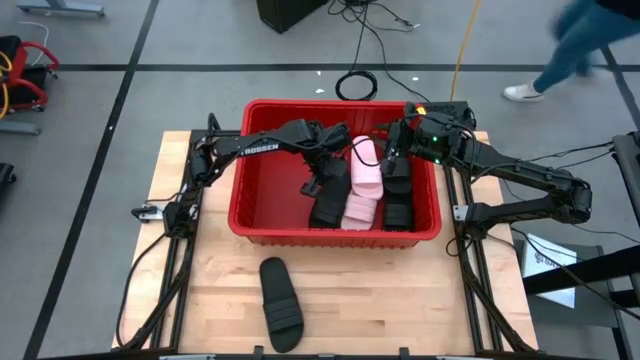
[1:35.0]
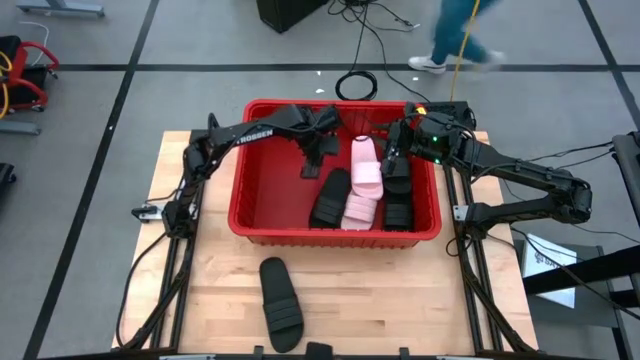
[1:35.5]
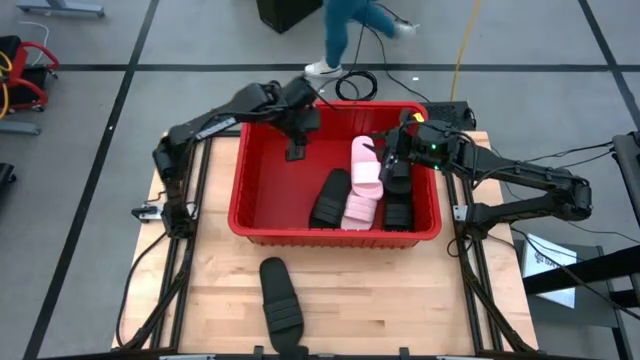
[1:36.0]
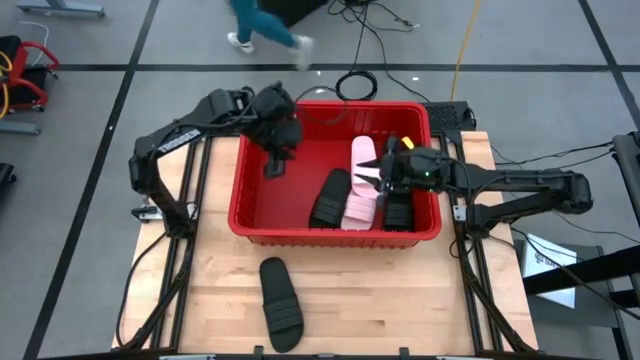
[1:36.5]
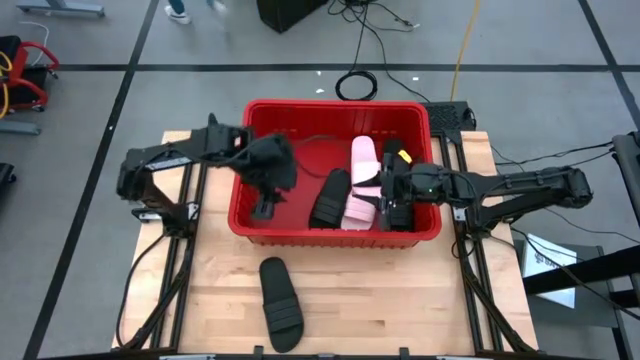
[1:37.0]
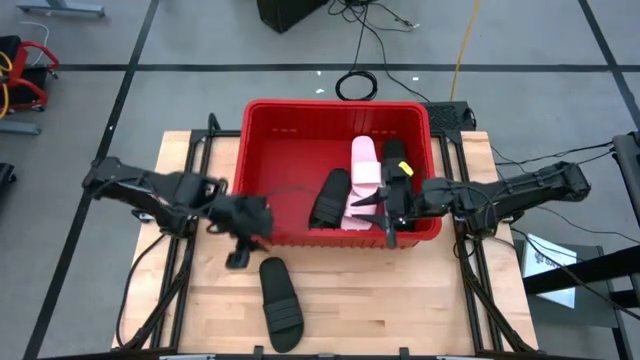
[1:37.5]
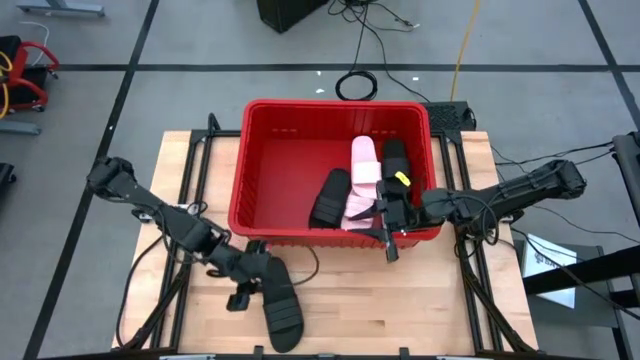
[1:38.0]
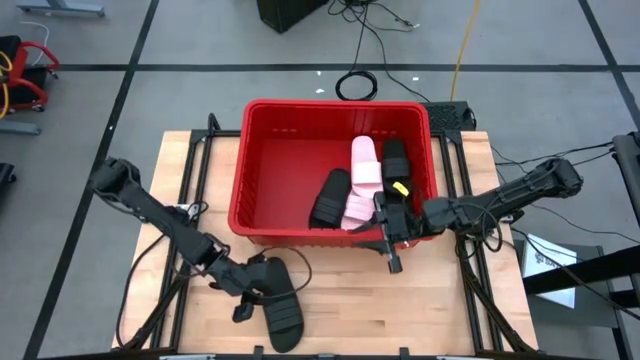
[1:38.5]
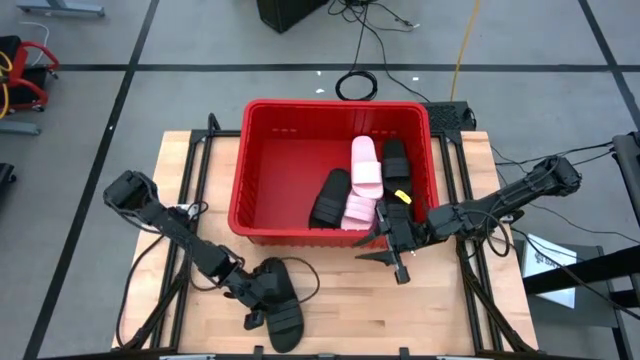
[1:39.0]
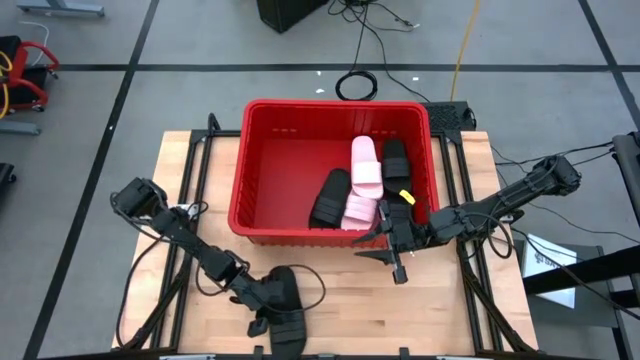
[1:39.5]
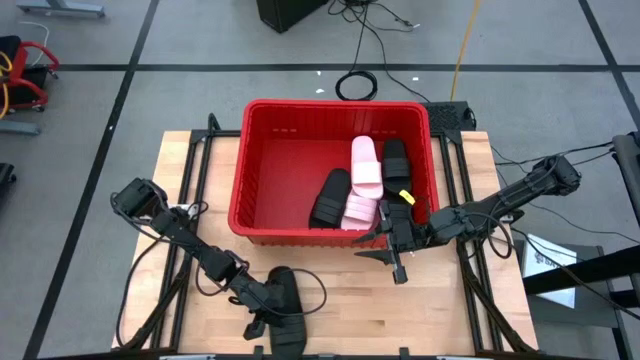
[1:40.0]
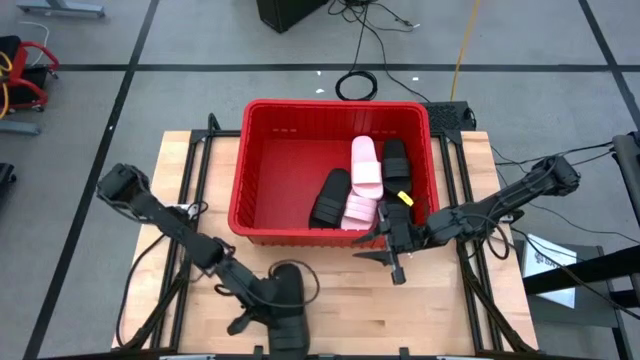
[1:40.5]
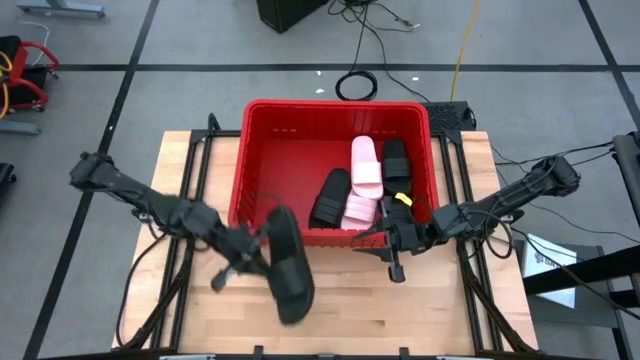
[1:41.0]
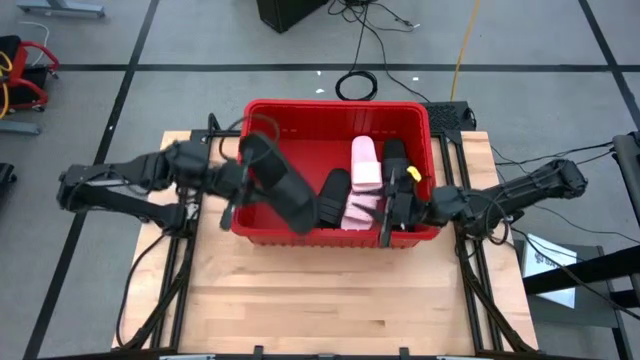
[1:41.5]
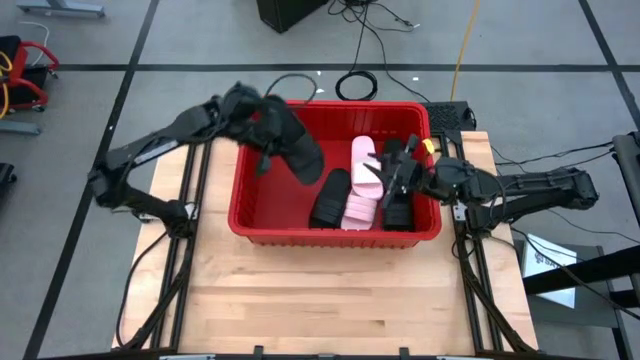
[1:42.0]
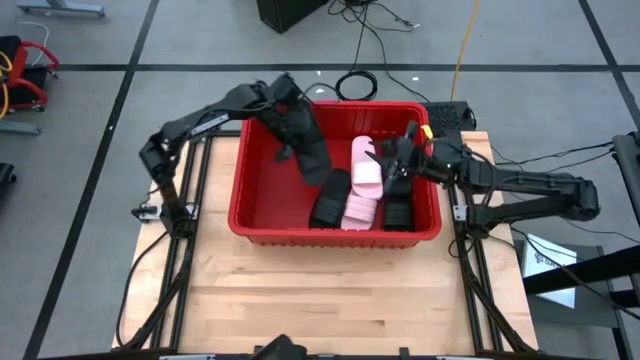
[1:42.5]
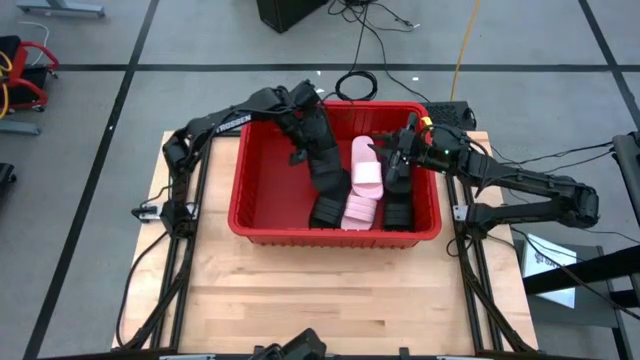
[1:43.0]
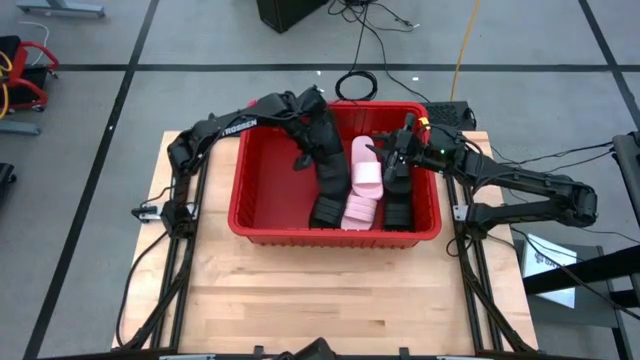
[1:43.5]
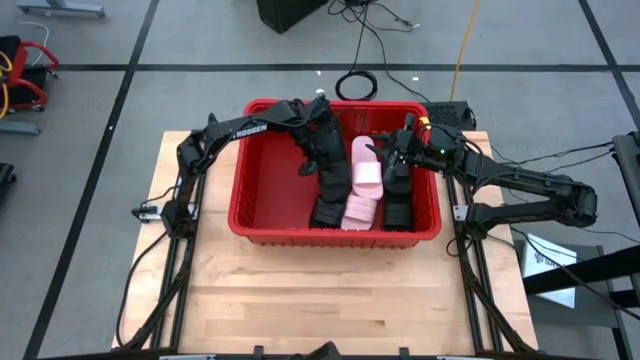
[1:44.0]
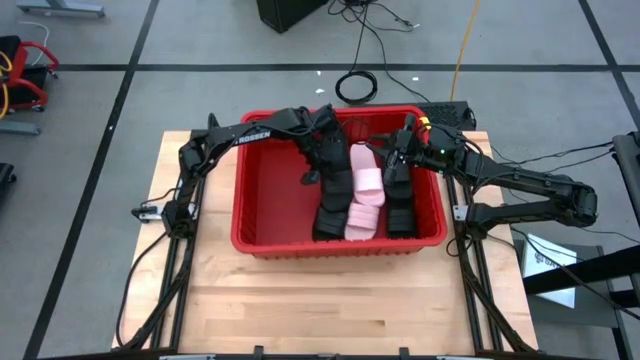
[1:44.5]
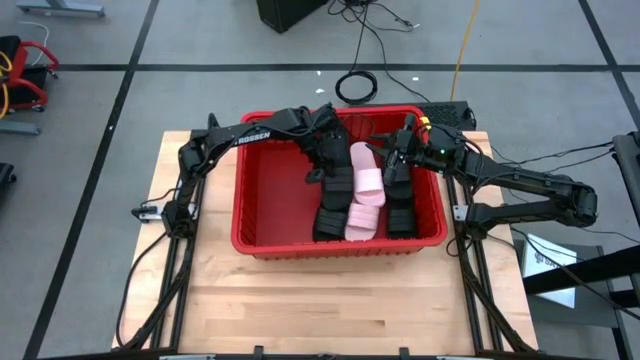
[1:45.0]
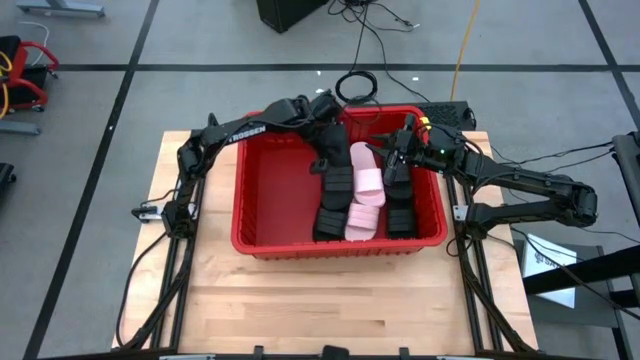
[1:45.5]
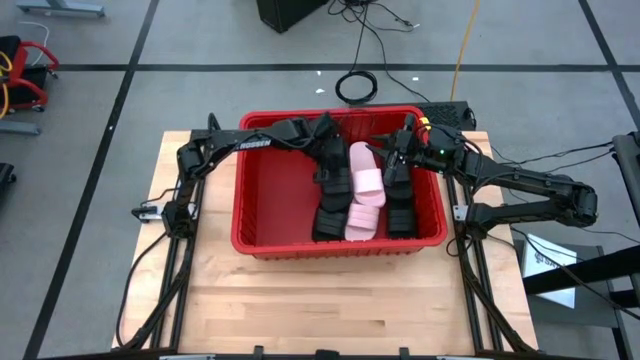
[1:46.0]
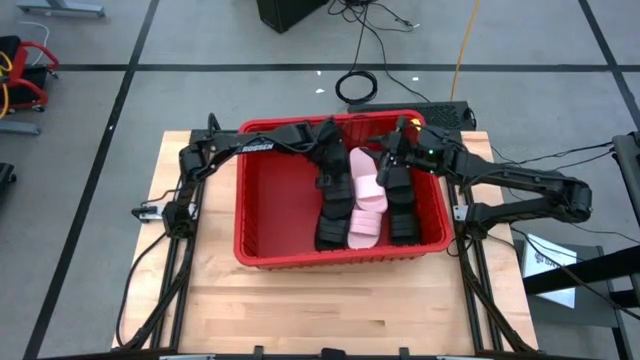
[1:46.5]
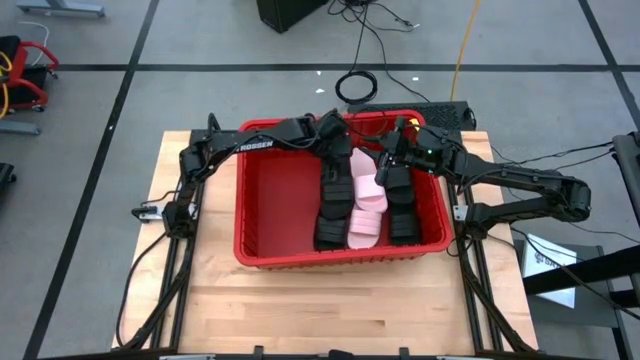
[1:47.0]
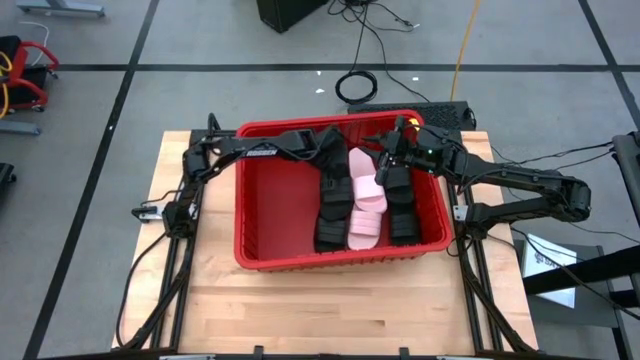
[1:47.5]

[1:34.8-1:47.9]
Task: Pick and place slides into bin
Put the black slide into the red bin

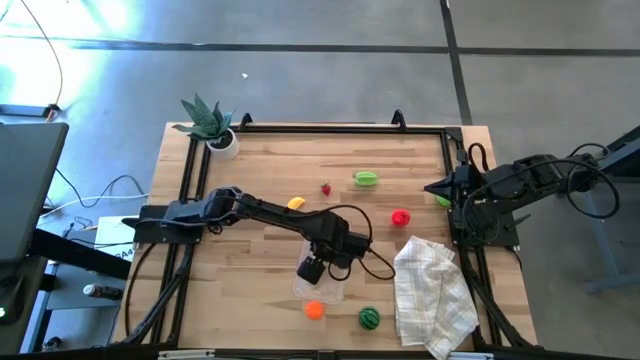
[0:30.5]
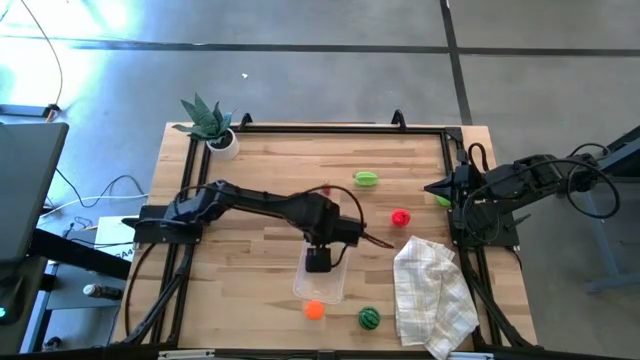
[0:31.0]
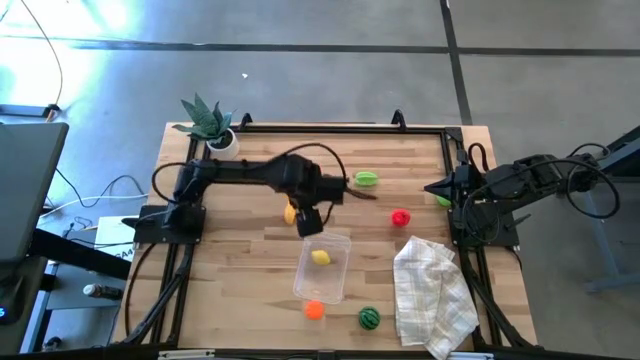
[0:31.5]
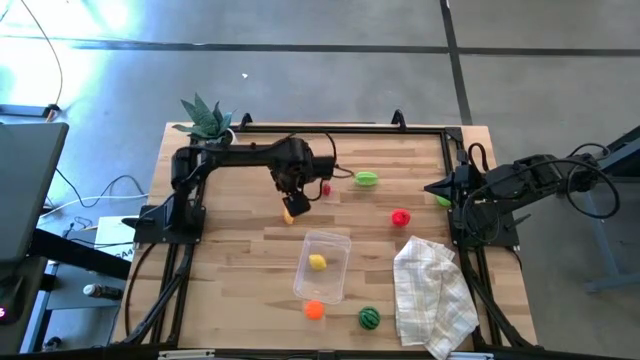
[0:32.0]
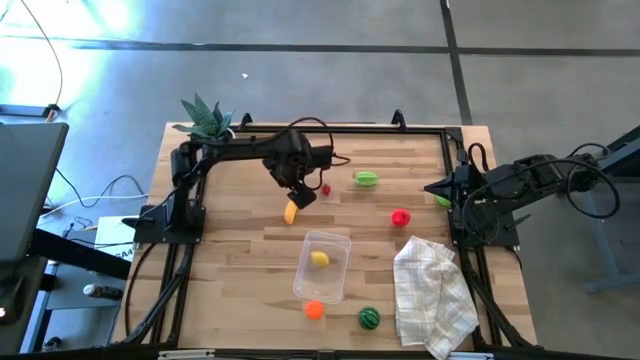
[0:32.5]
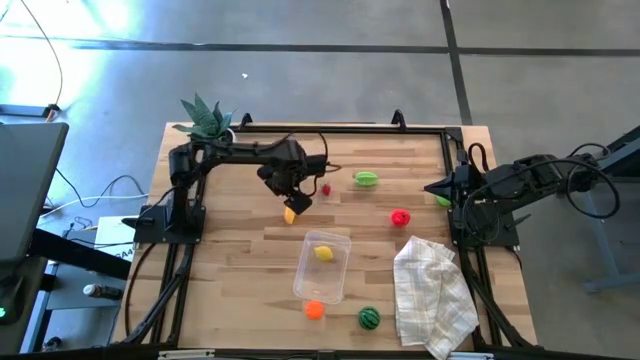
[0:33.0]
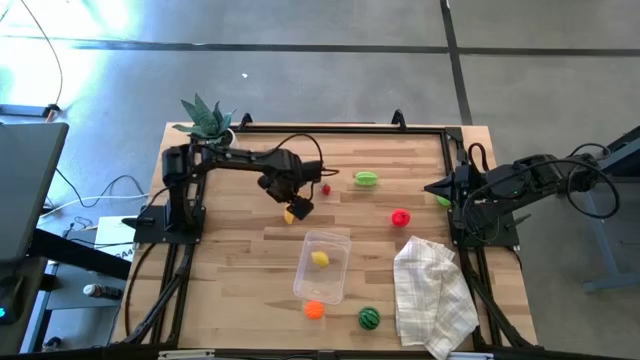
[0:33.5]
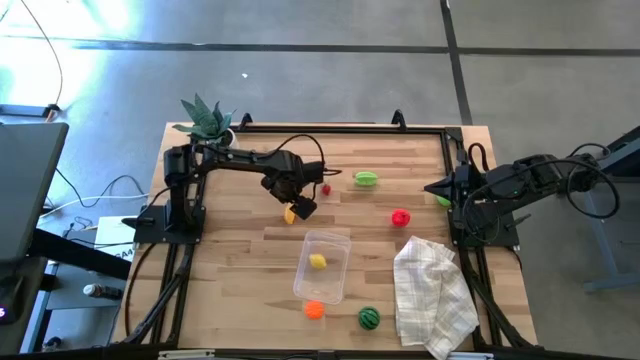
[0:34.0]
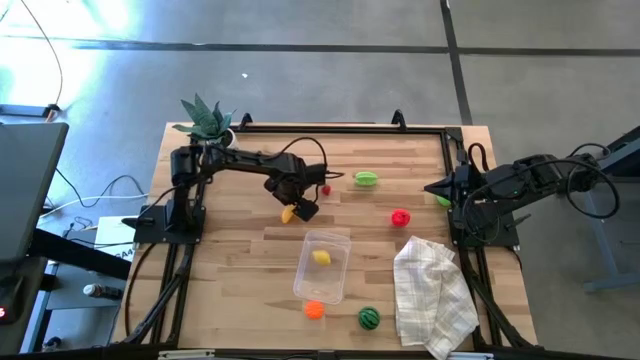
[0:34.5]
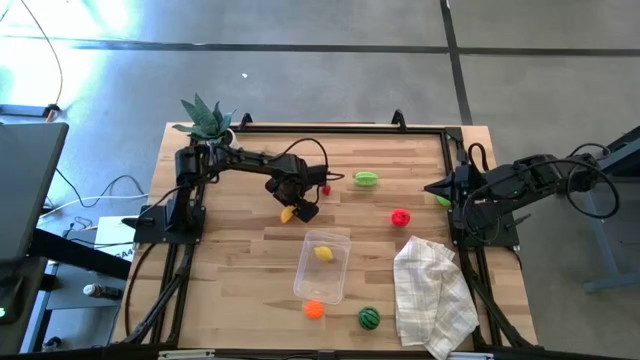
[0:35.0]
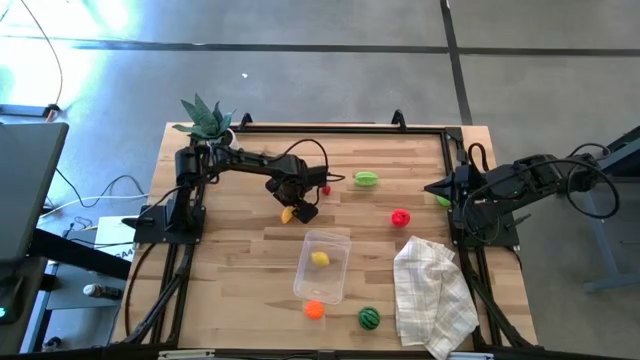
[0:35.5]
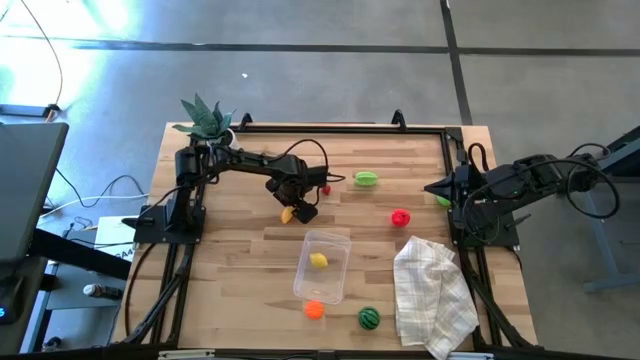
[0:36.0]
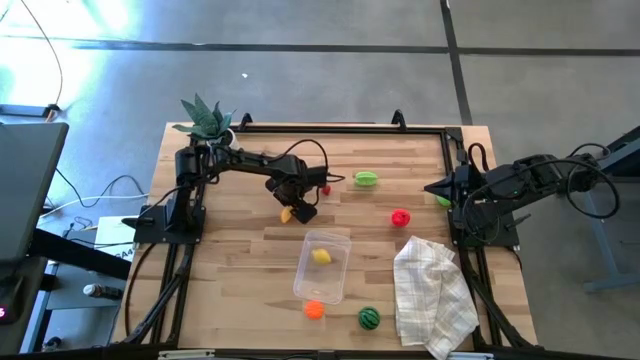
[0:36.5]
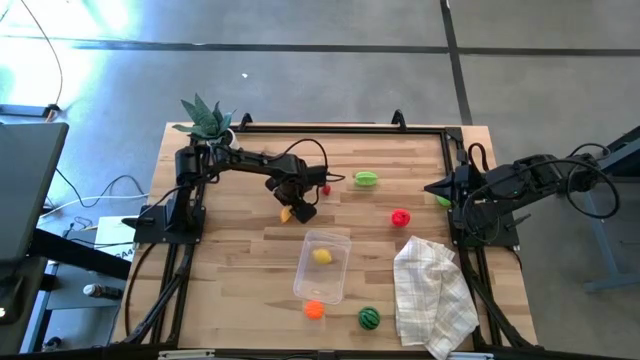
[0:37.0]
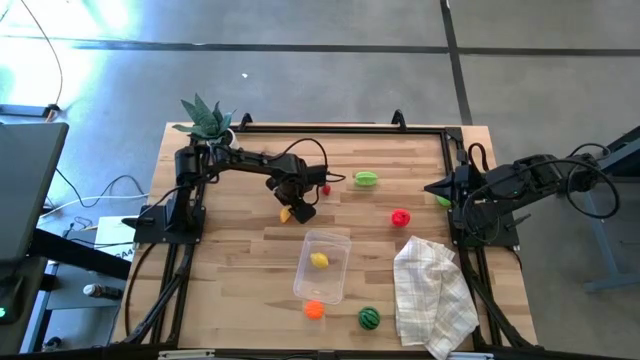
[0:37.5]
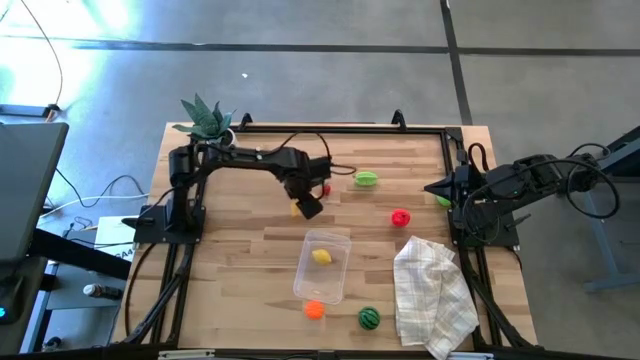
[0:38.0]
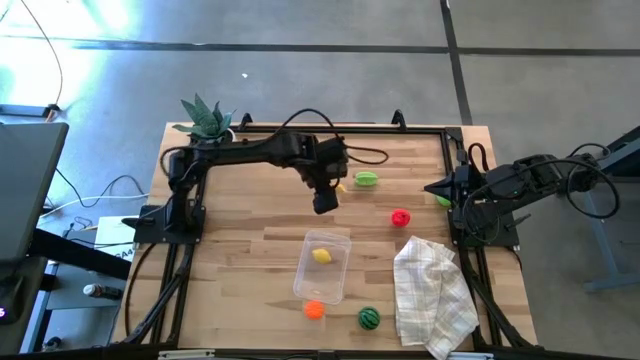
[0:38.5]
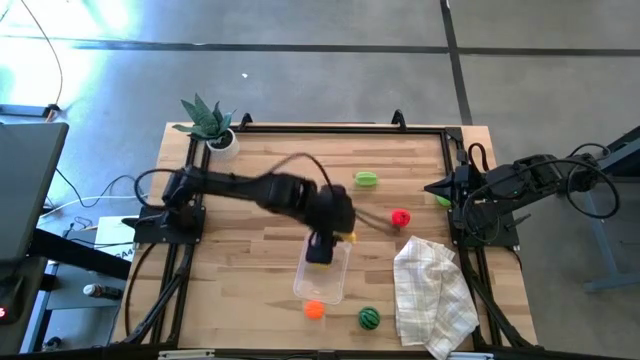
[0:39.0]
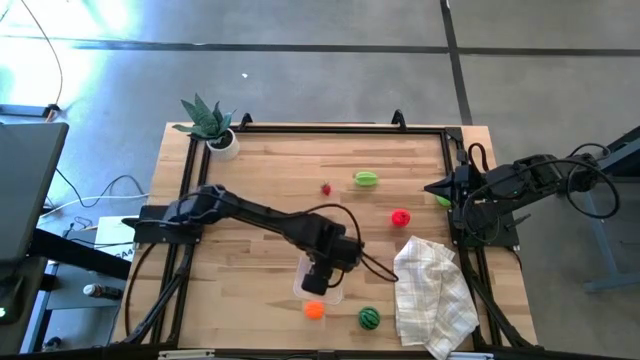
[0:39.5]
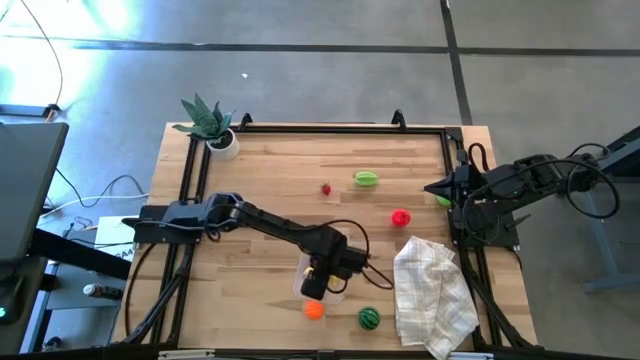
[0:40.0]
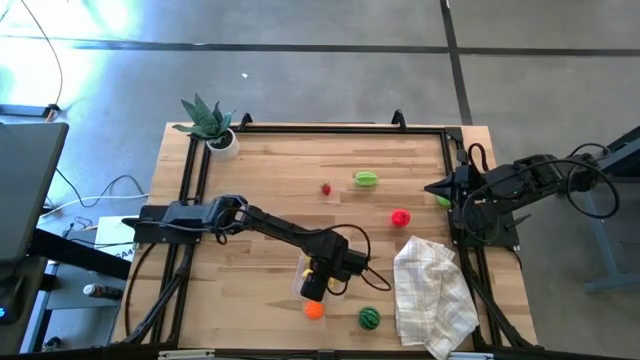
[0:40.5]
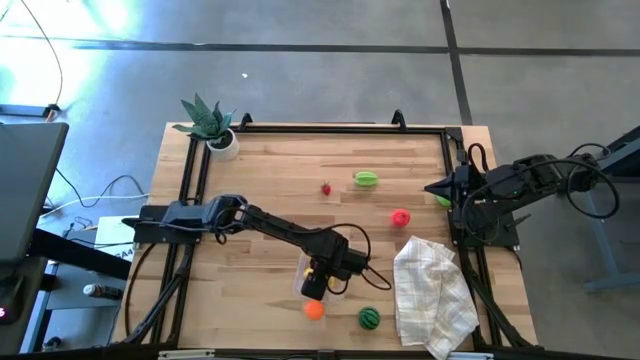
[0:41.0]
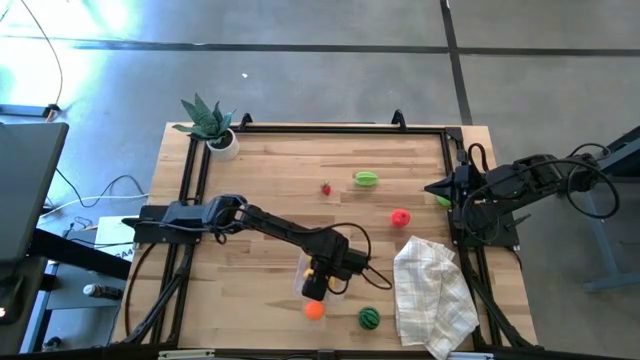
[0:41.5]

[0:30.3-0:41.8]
Task: Pick and placing Produce into tupperware
Put the banana into the transparent bin
